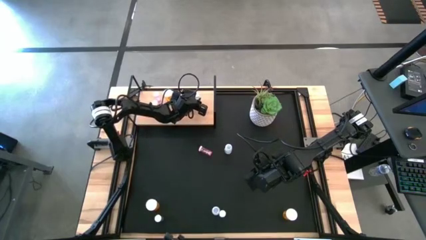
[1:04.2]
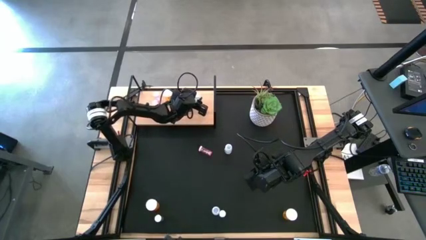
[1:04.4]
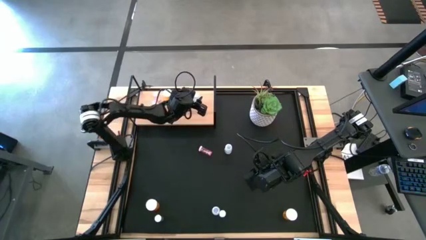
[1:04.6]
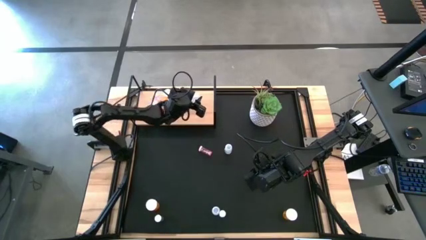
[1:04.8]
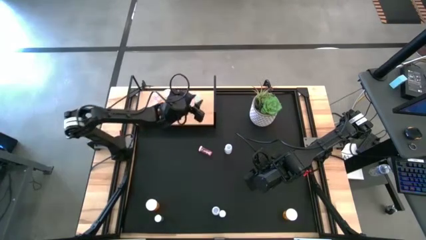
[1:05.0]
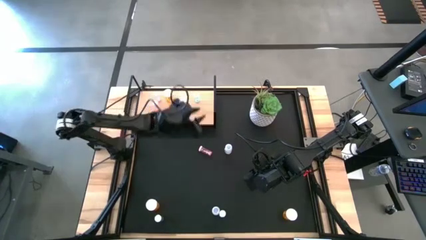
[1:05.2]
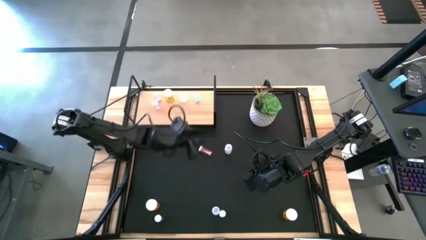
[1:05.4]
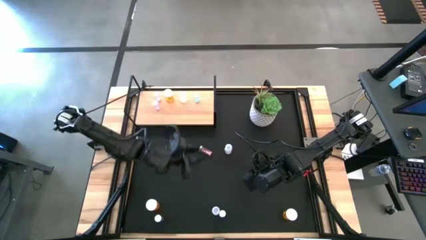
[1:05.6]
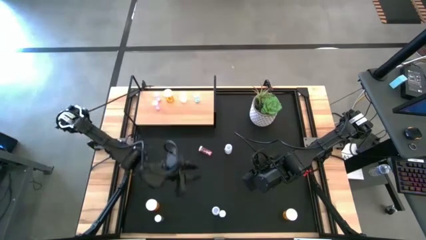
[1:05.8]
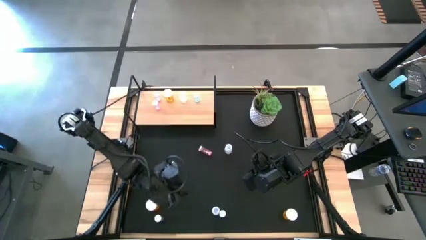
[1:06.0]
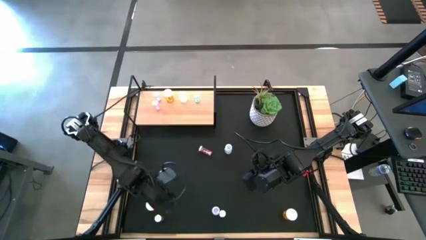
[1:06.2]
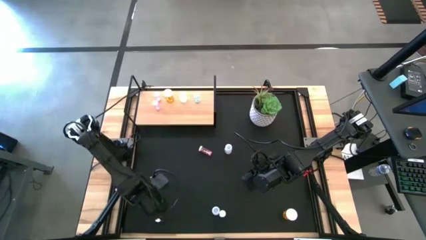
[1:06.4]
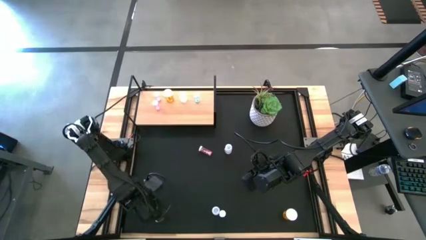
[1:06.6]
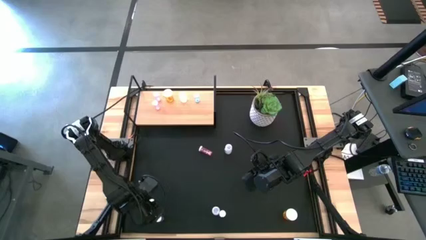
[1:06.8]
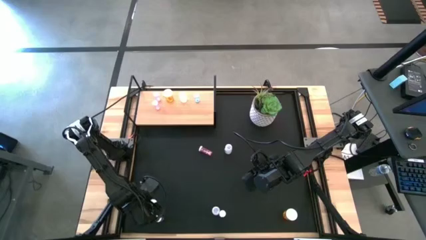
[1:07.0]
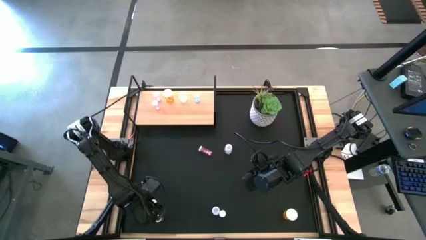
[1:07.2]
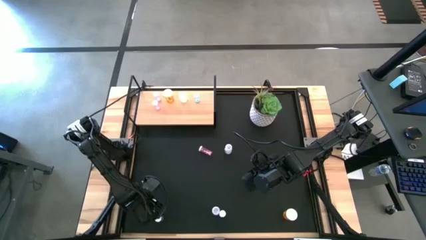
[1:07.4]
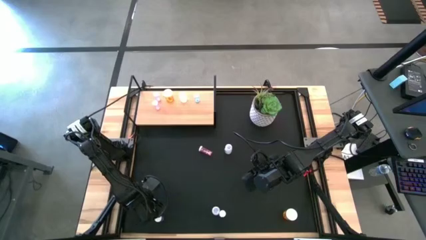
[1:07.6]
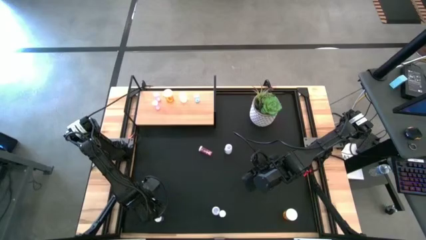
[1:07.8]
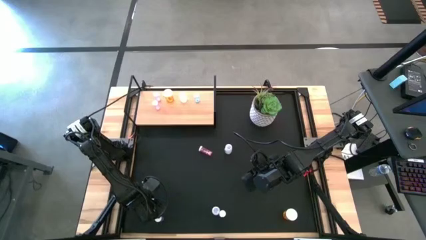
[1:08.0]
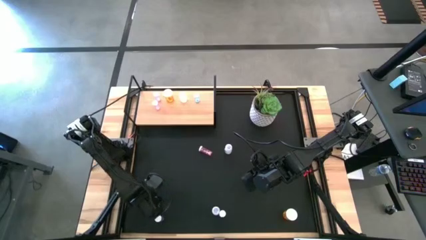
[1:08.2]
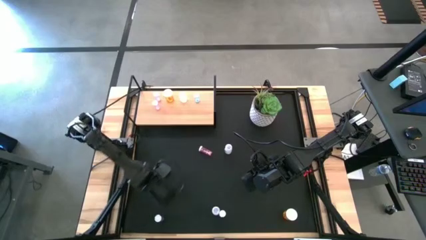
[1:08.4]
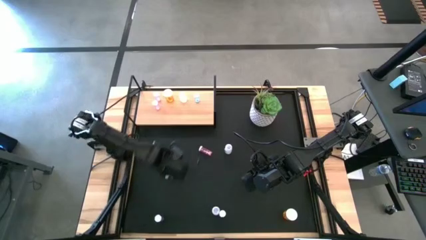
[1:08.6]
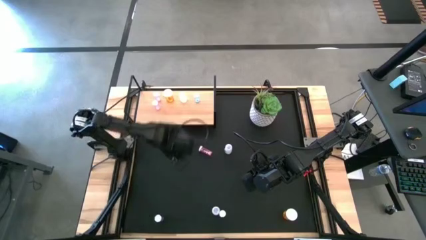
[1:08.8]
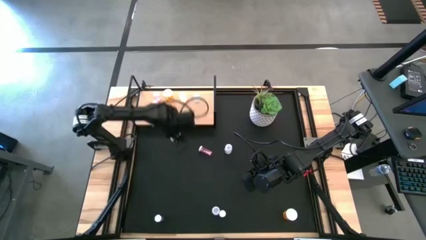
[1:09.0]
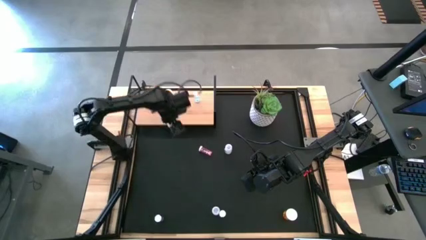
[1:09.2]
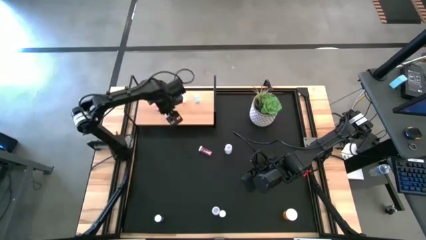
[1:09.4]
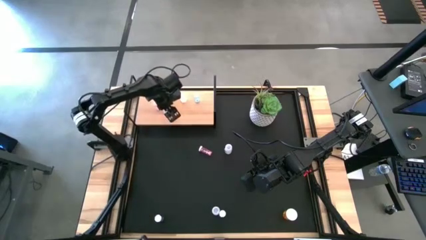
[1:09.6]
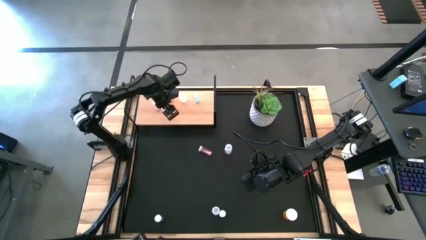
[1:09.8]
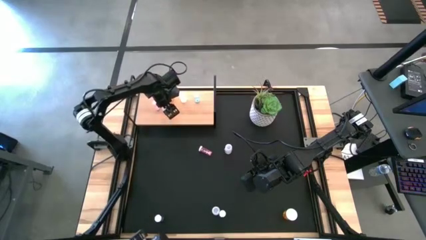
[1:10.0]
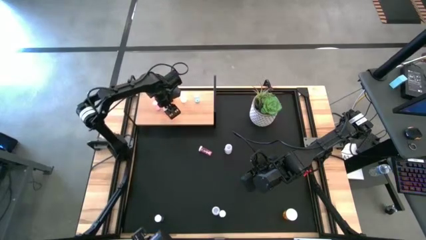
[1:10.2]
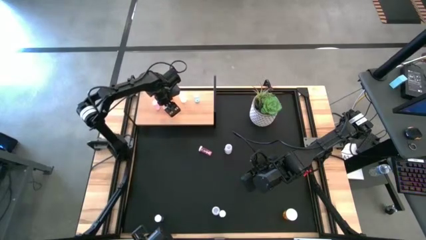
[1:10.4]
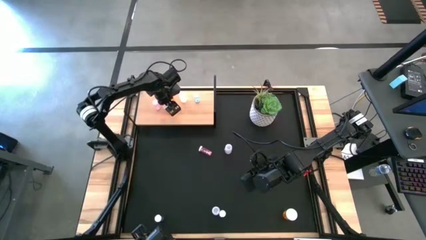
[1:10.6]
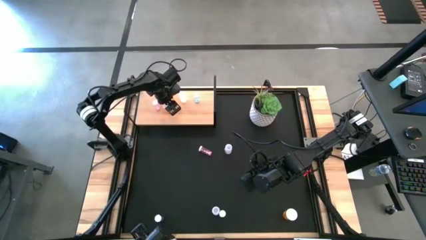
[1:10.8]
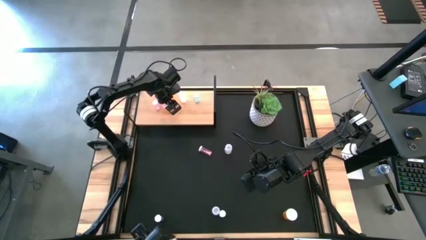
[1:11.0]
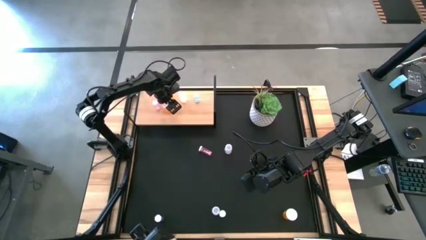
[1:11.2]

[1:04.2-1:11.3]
Task: Pick and place medicine bottles onto shelf by color
Put the left orange pill bottle on the shelf aligned with the other orange pill bottle

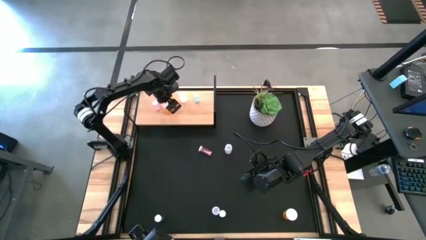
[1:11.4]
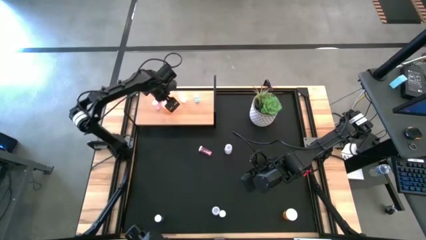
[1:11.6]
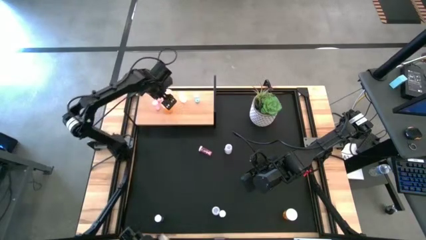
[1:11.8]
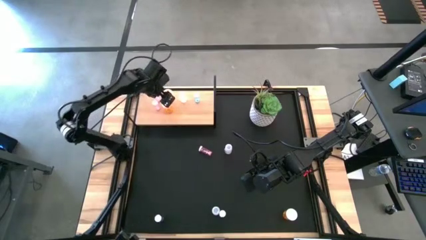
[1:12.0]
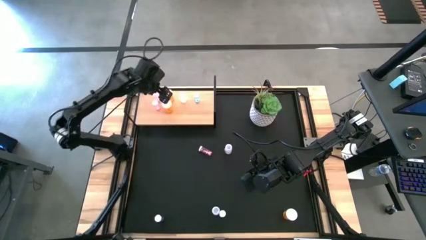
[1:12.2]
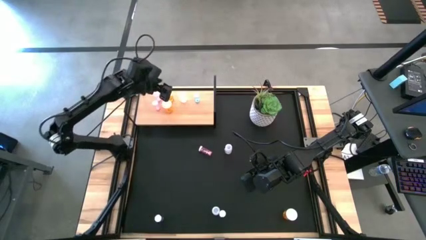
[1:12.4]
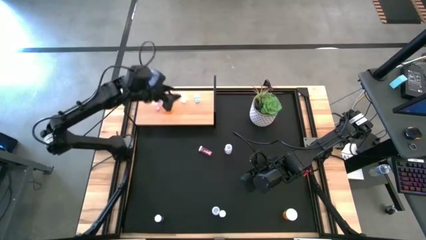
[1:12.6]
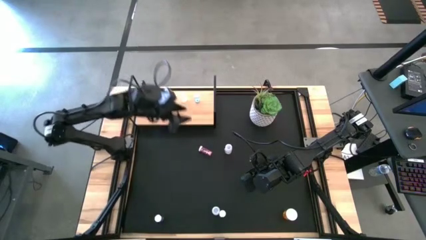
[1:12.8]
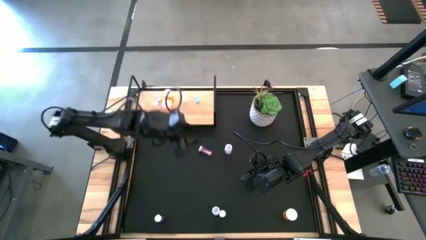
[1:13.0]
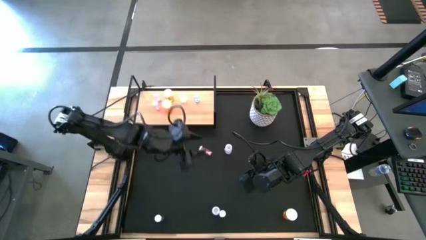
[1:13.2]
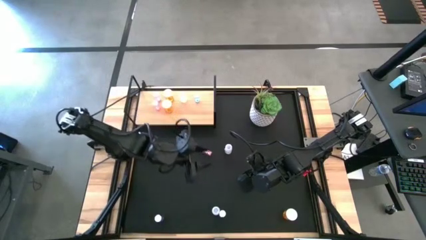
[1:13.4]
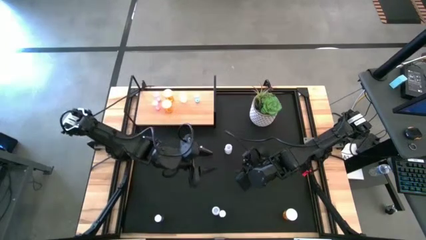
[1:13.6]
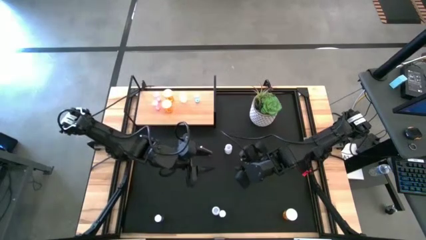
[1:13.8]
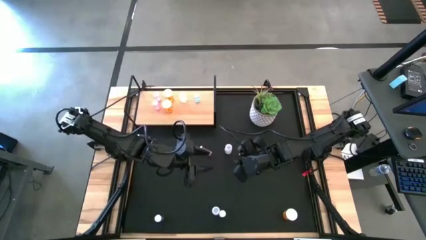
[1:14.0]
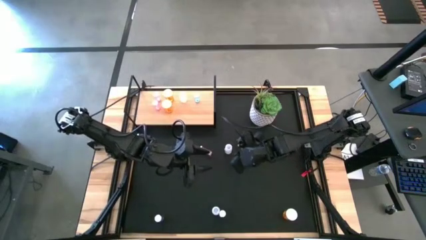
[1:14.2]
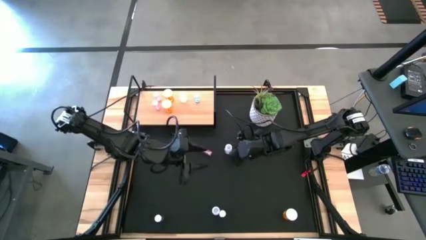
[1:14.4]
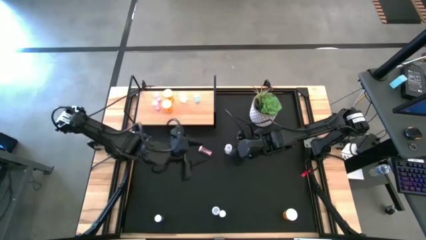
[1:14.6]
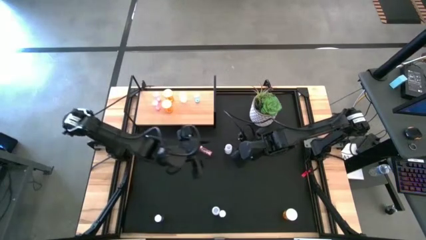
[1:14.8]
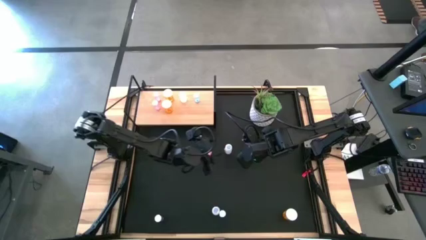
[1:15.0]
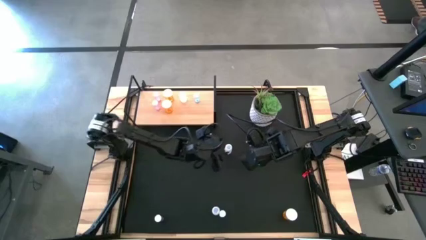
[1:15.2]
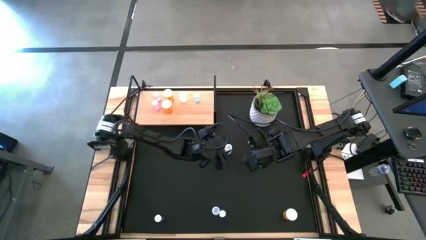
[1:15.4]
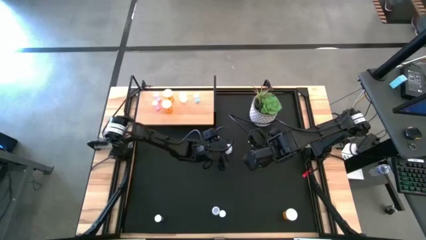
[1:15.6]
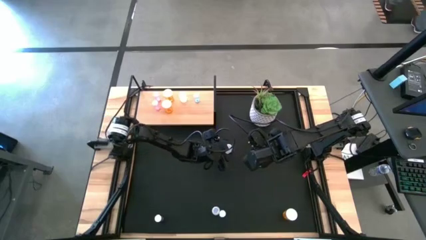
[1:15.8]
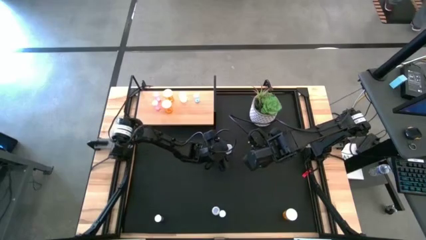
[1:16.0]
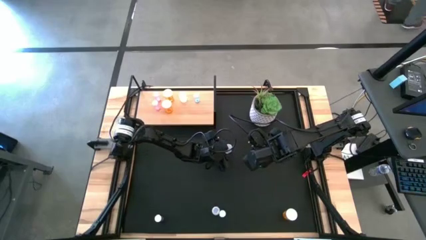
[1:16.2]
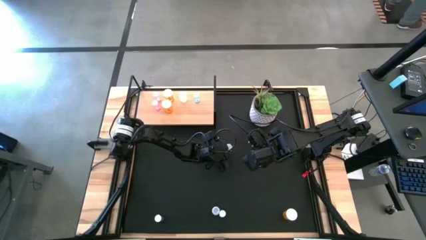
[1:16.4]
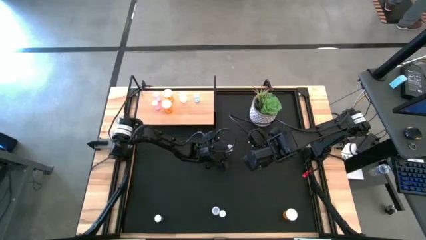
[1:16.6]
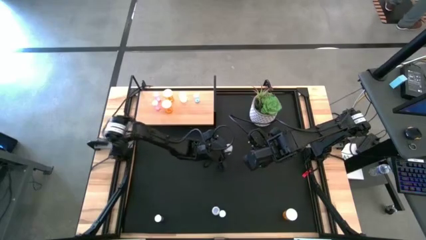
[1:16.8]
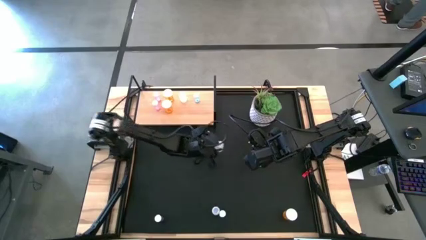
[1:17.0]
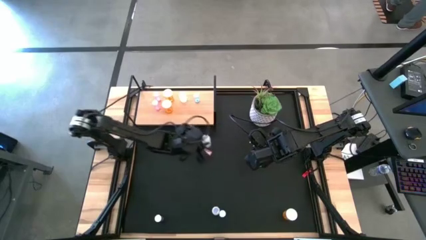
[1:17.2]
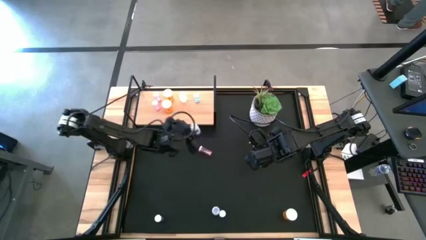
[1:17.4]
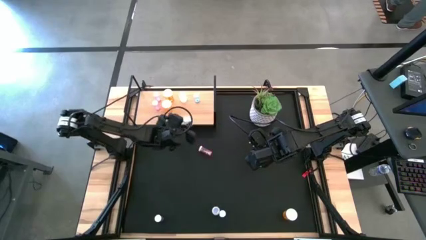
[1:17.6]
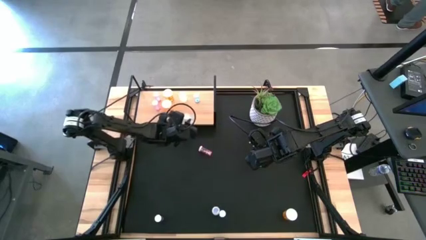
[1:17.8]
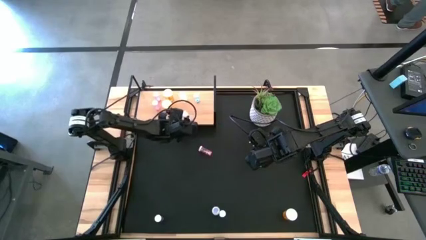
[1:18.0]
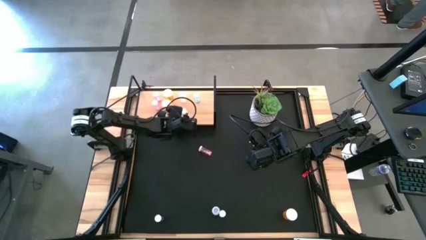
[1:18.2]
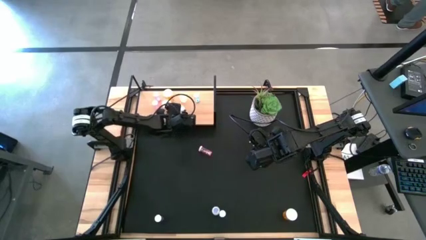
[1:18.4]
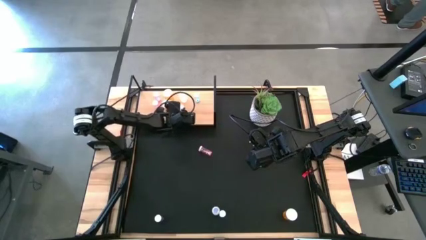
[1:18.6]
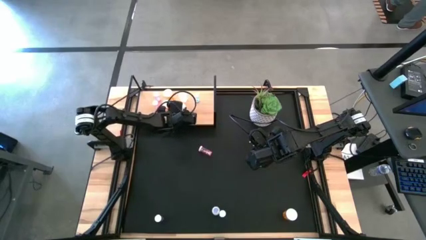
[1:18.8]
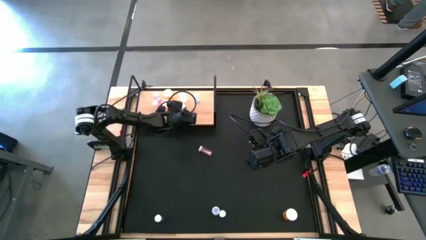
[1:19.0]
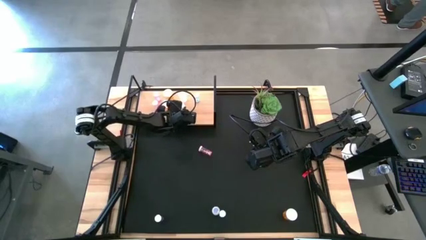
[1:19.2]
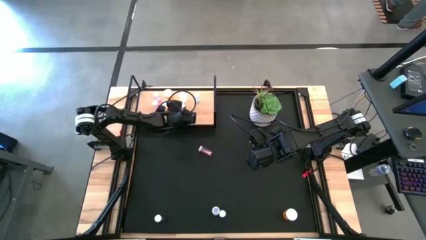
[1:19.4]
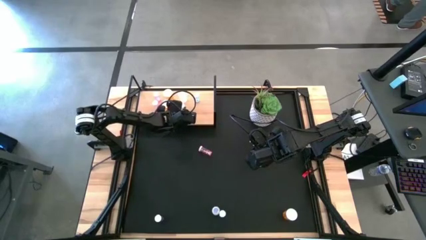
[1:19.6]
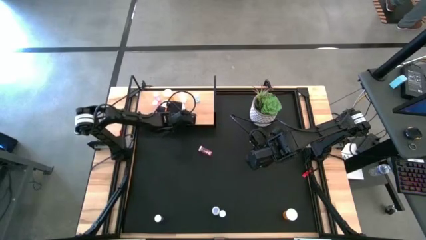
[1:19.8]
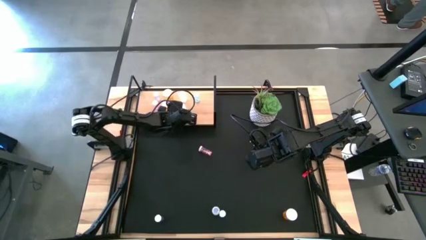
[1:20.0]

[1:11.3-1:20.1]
Put the top white pill bottle on the shelf aligned with the other white pill bottle
